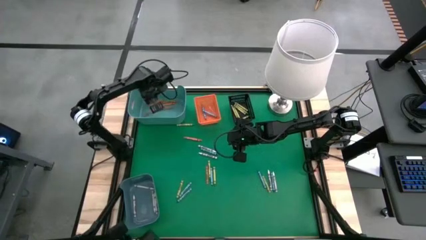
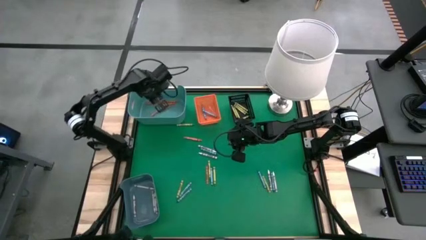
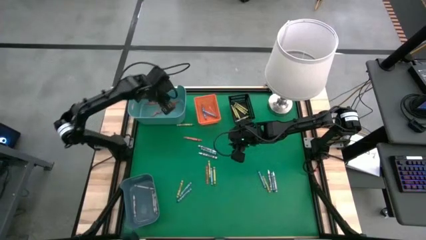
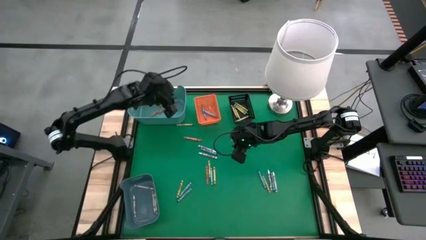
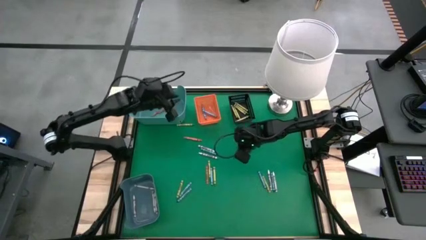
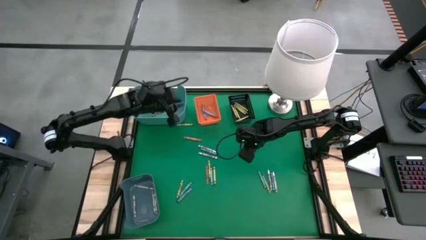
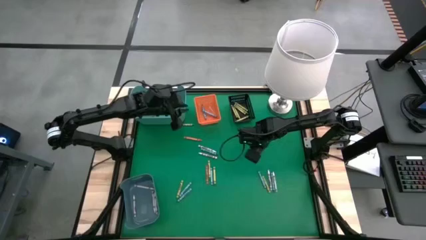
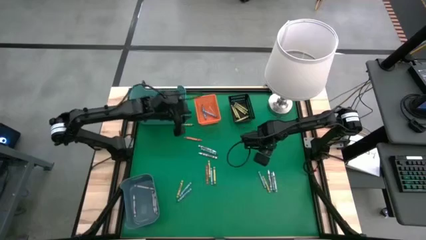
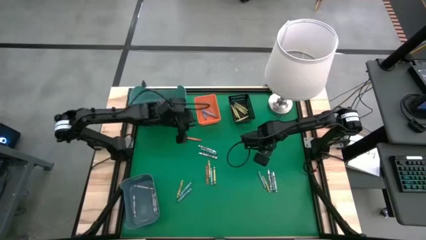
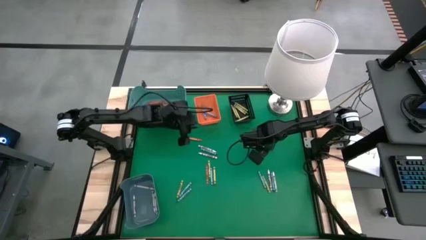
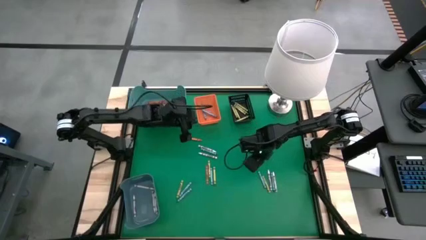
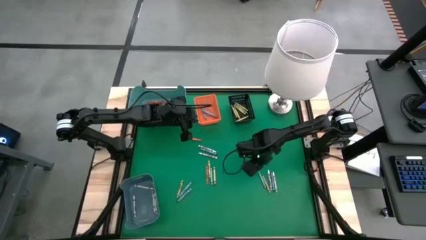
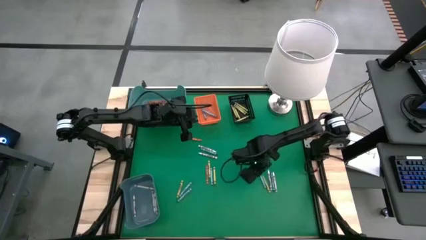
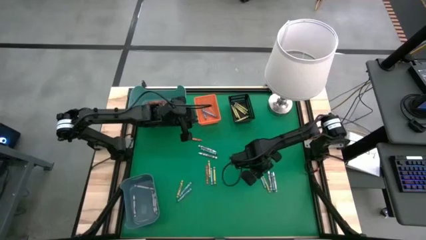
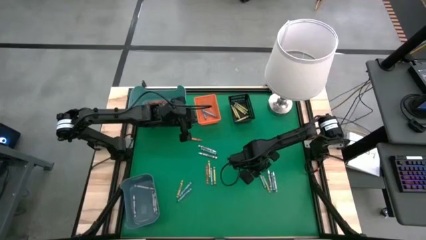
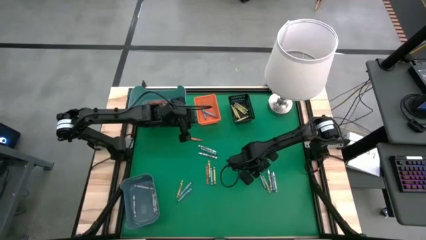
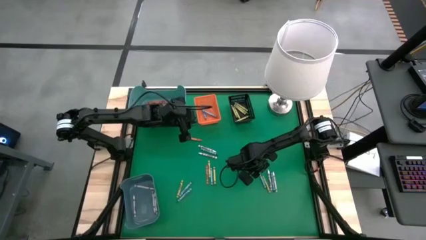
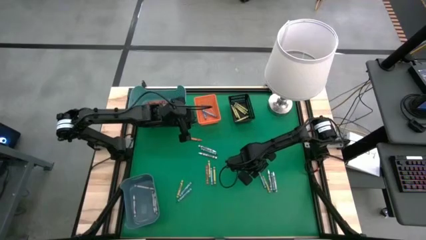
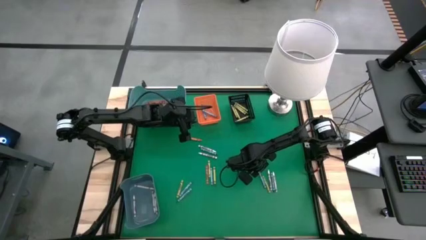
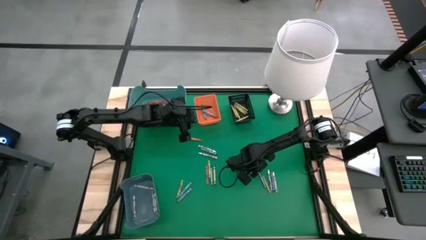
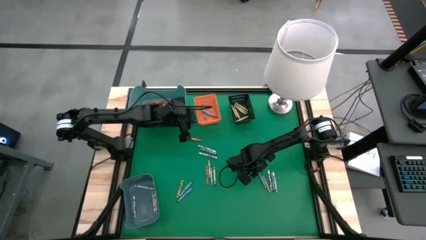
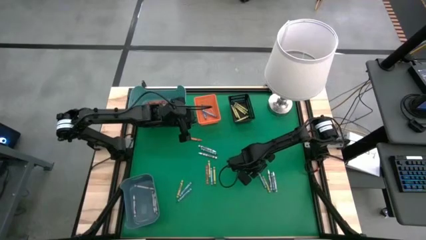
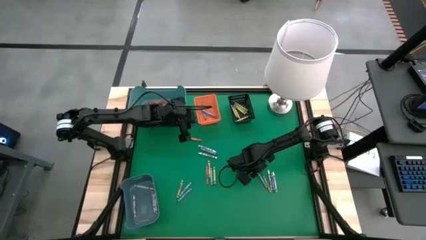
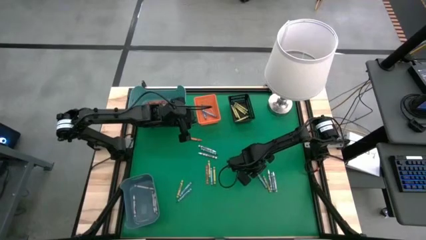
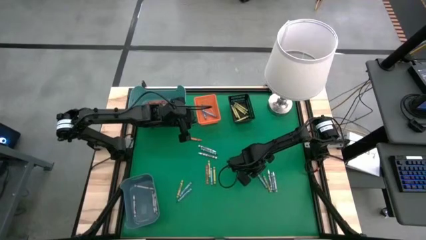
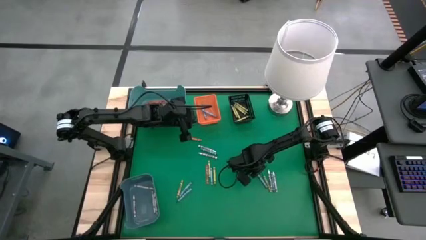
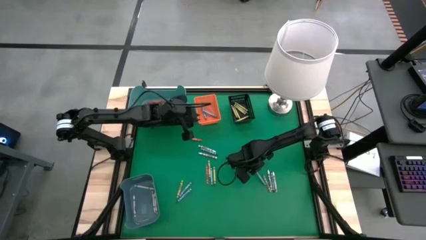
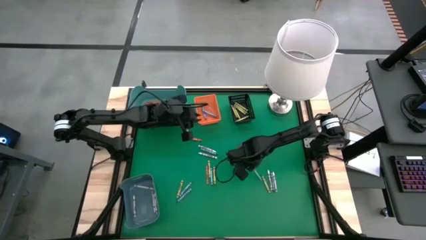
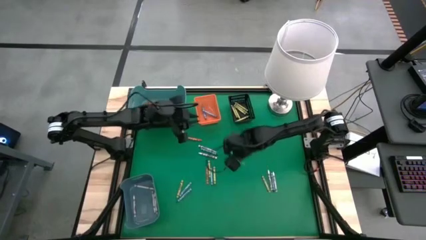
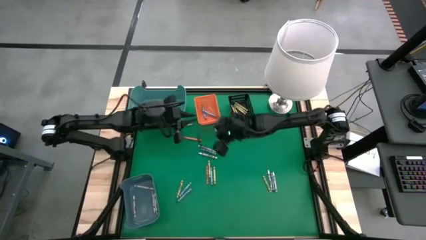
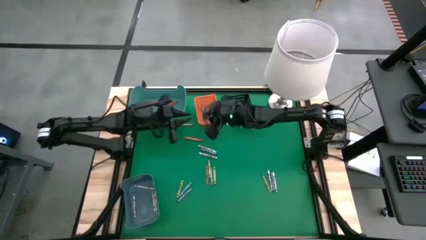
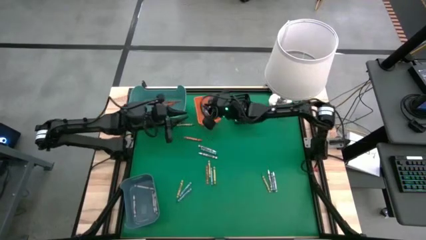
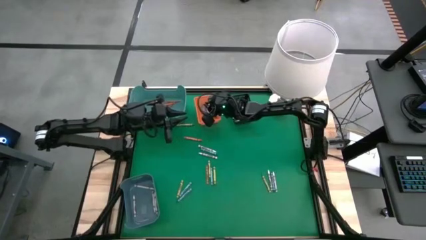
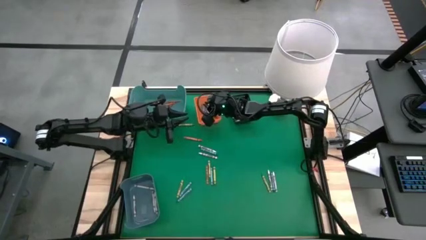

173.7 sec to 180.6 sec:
Task: Sort crayons
Put the blue crayon into the orange bin

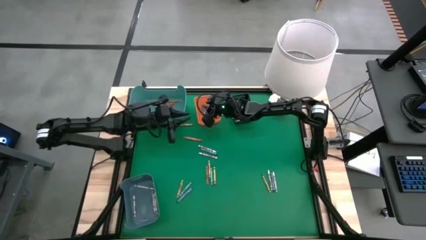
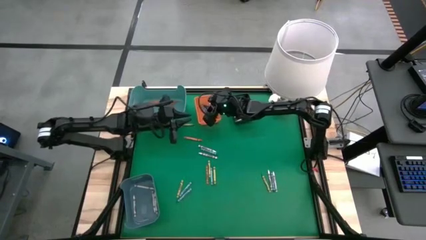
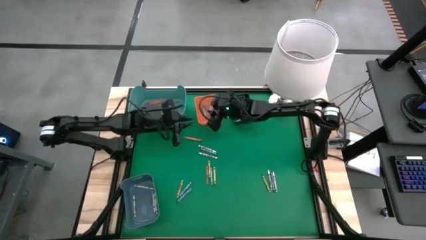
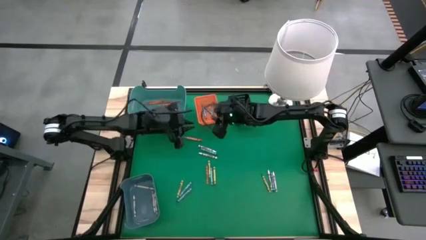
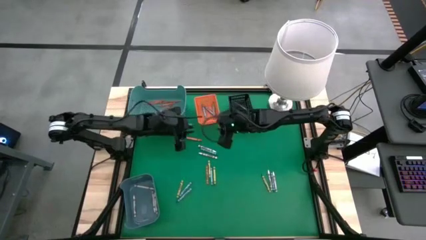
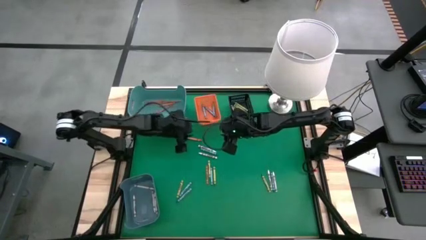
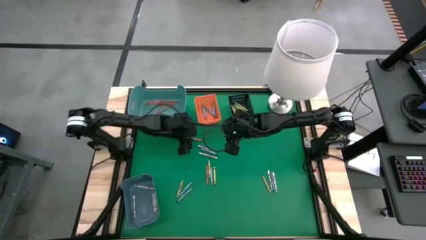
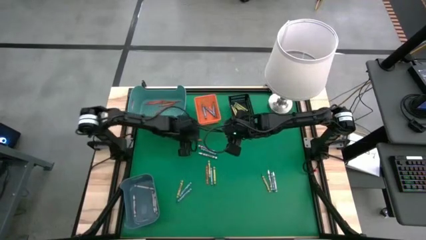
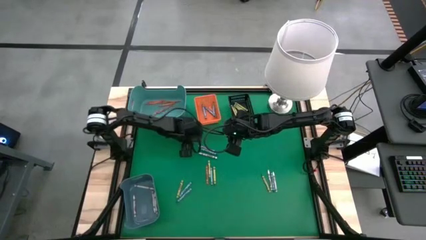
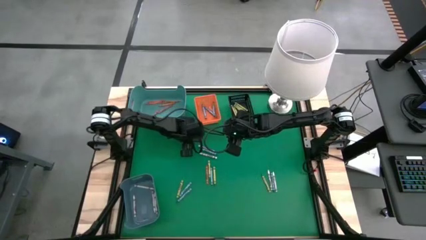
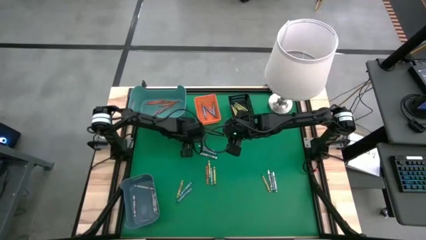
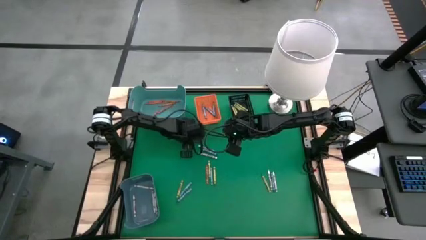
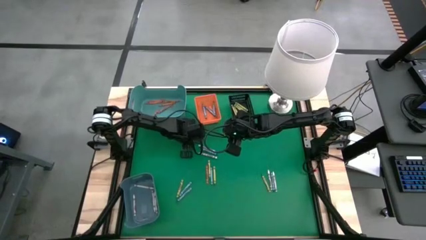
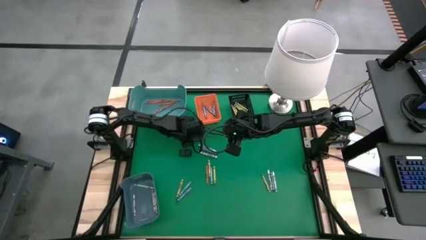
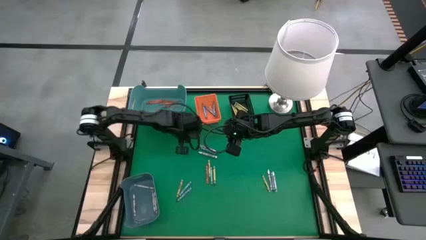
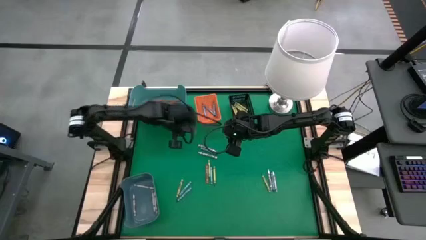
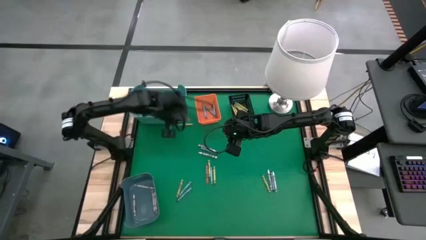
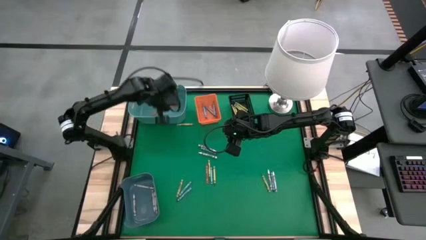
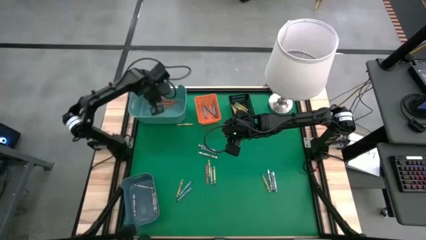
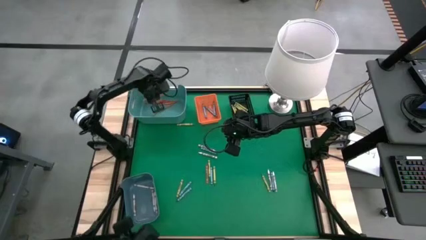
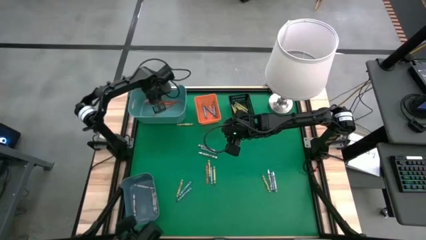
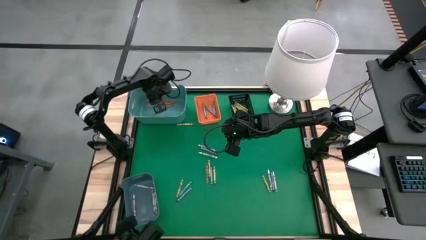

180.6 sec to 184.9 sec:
Put the orange crayon into the green bin

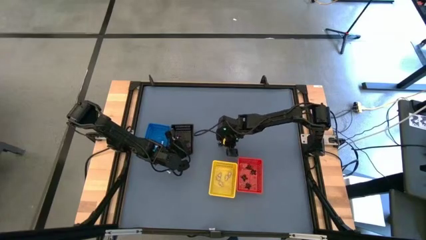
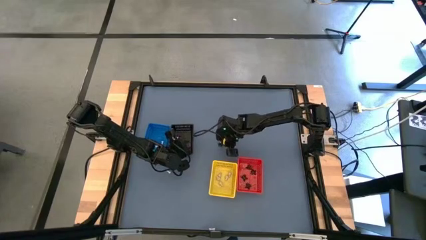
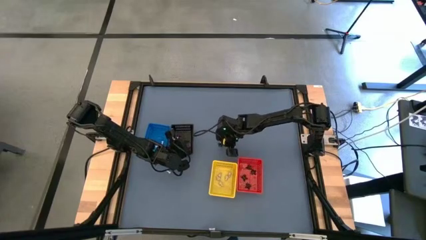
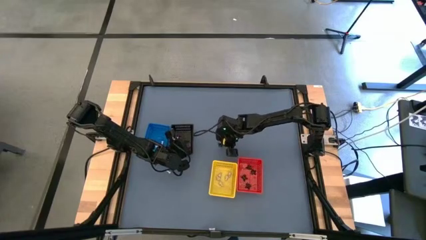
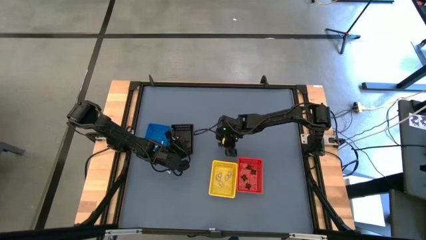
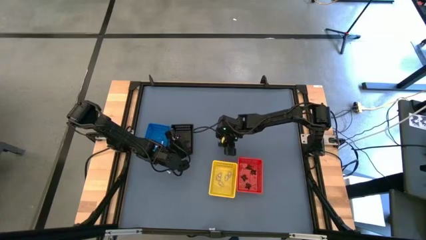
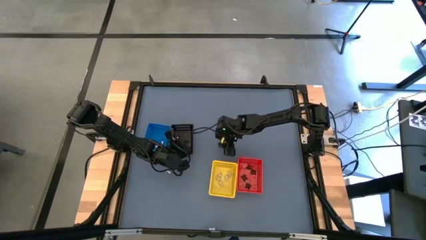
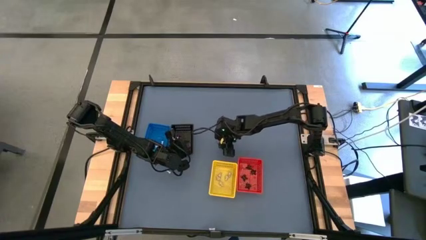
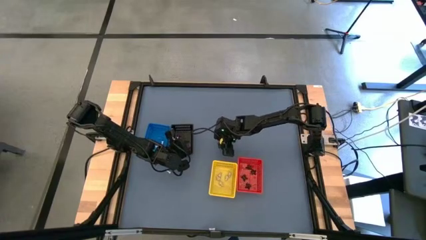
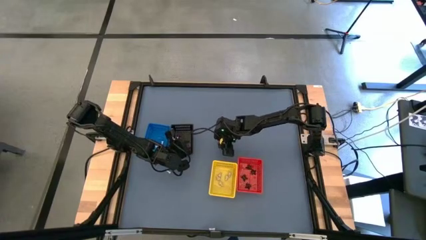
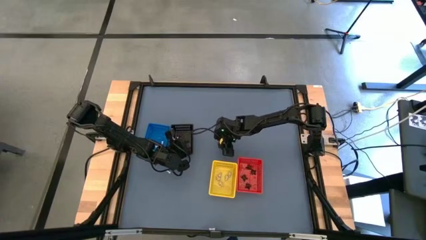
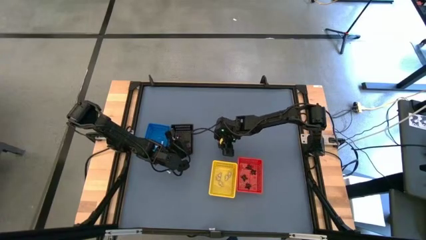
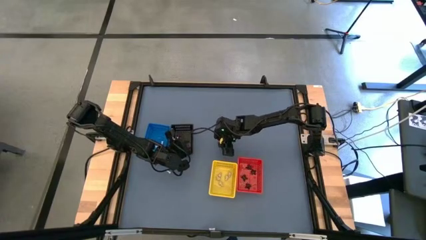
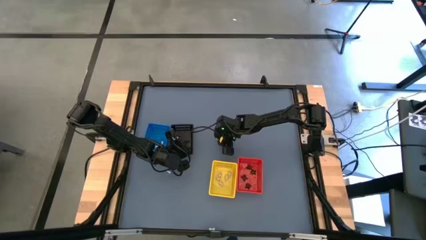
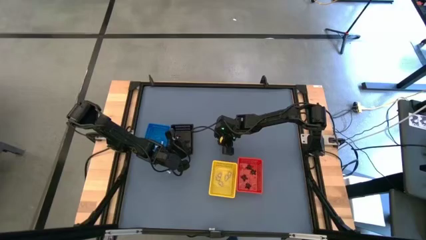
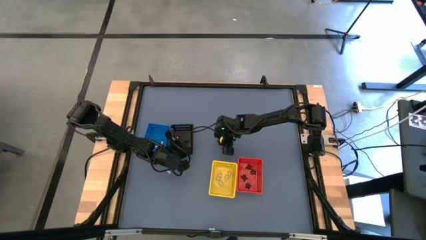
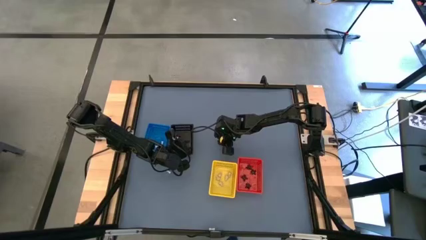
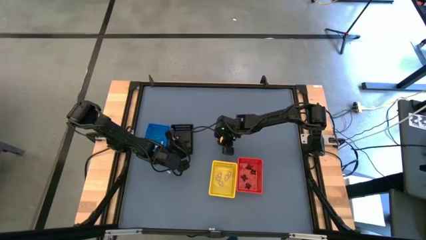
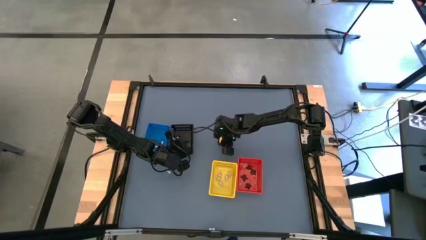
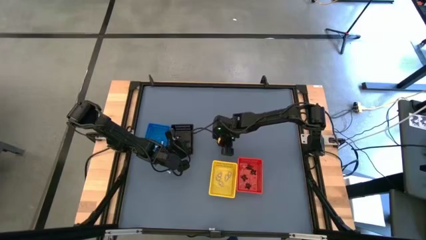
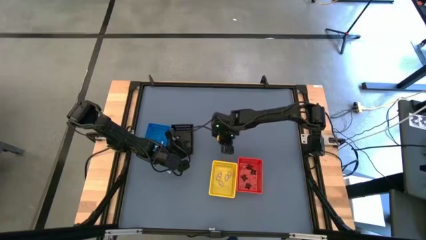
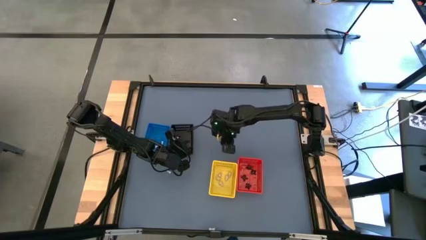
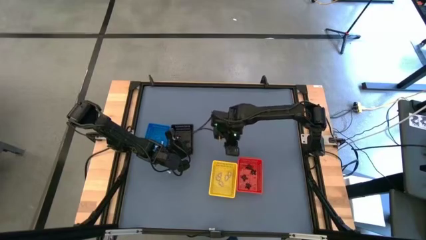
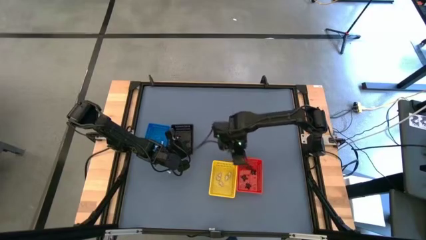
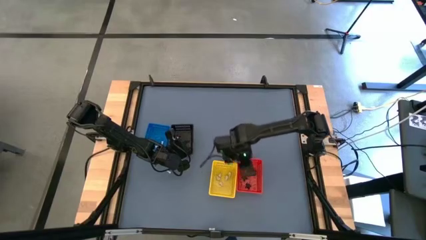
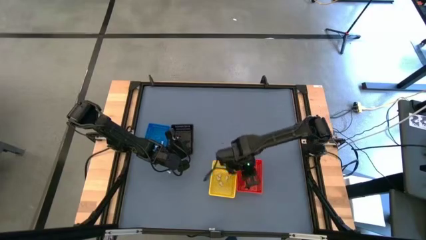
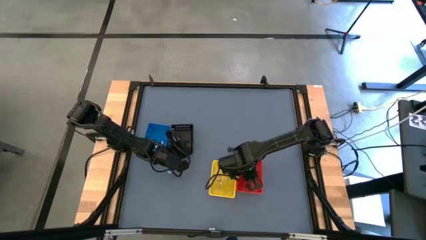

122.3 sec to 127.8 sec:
Task: Sort Halloween decoration
Put the spider toy into the red bin
